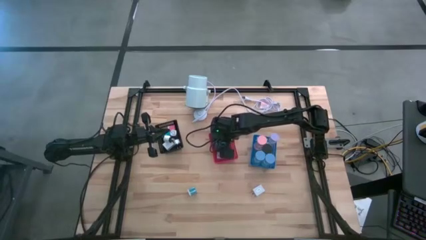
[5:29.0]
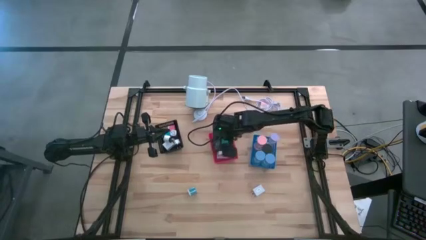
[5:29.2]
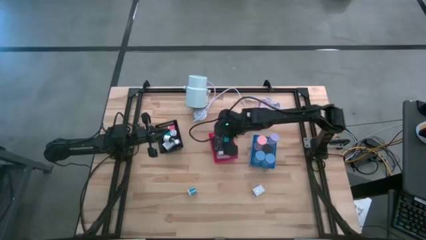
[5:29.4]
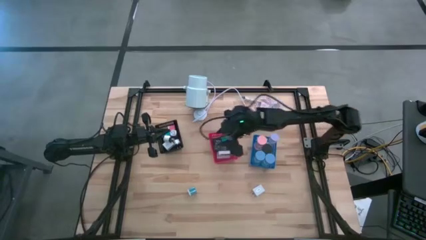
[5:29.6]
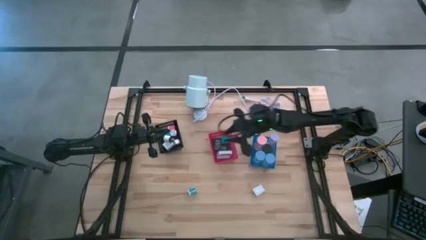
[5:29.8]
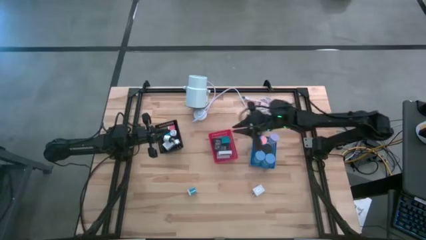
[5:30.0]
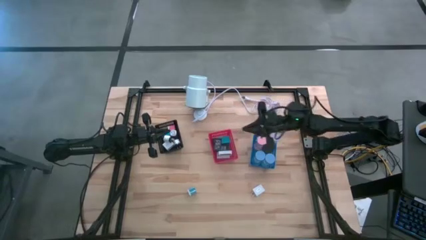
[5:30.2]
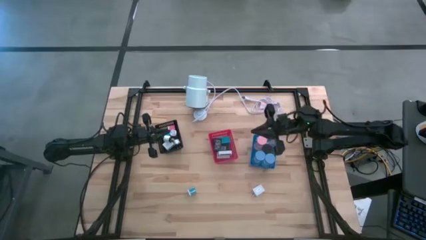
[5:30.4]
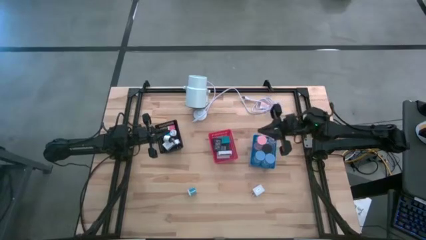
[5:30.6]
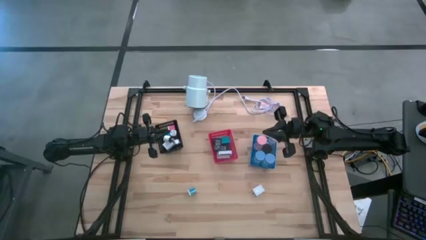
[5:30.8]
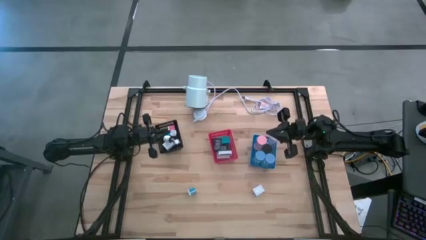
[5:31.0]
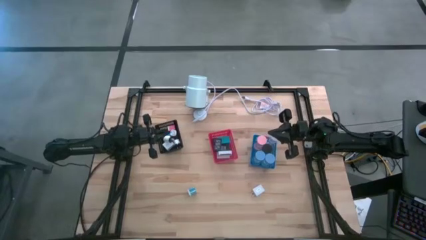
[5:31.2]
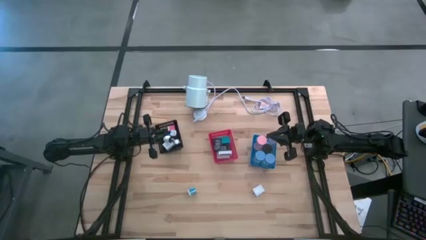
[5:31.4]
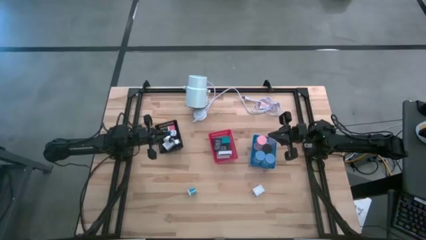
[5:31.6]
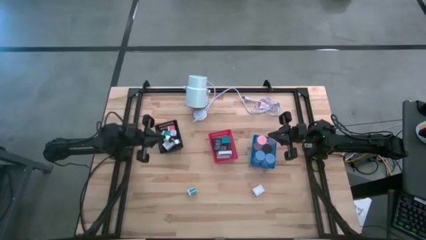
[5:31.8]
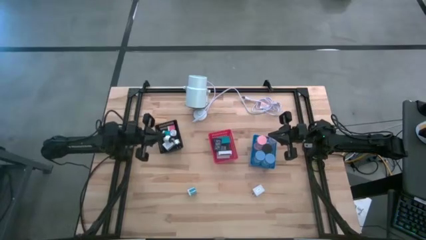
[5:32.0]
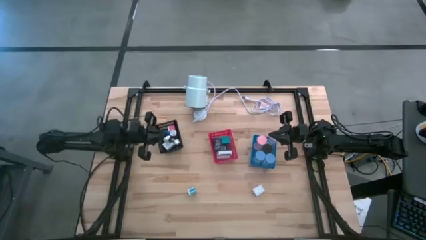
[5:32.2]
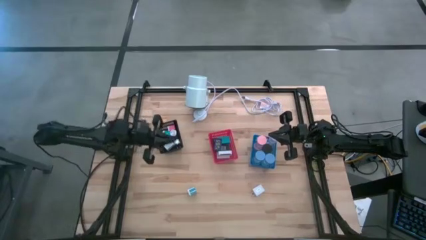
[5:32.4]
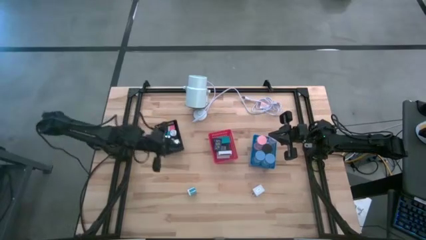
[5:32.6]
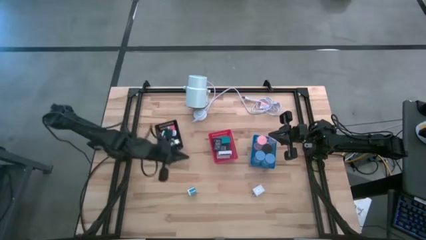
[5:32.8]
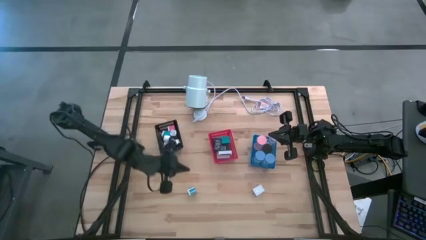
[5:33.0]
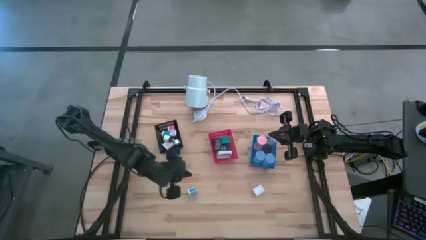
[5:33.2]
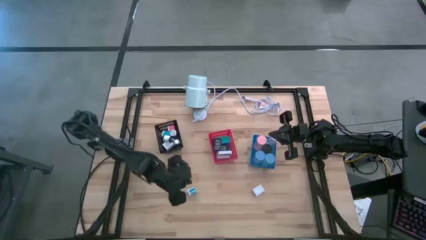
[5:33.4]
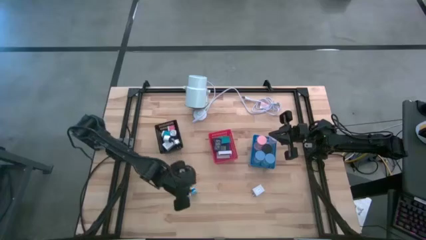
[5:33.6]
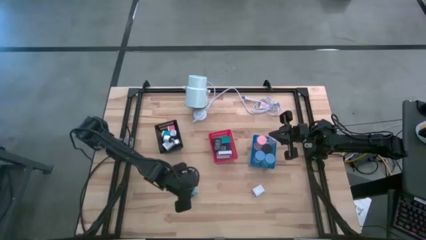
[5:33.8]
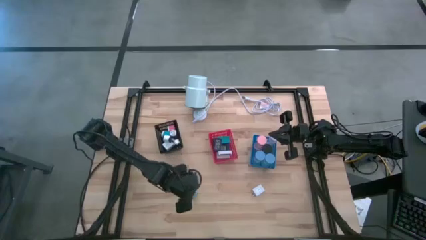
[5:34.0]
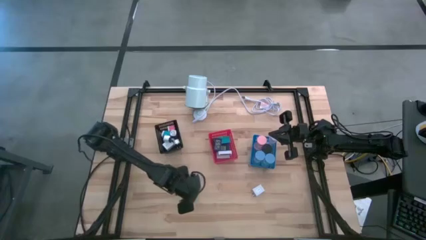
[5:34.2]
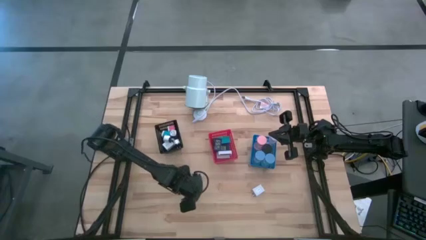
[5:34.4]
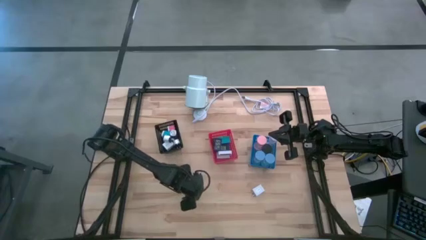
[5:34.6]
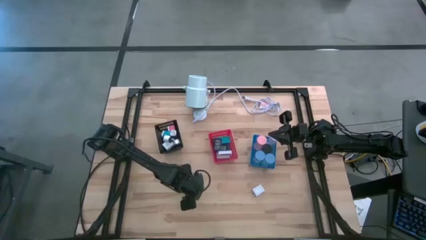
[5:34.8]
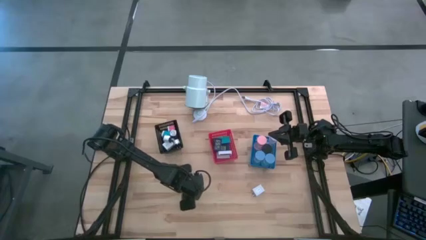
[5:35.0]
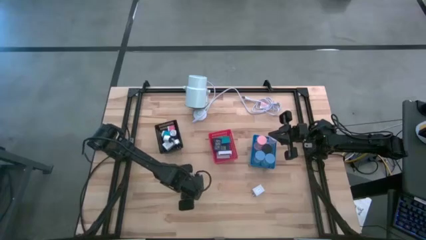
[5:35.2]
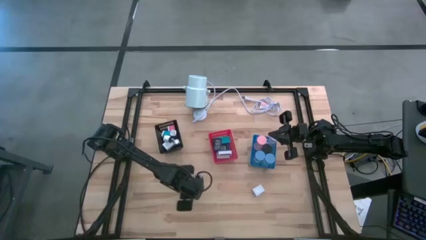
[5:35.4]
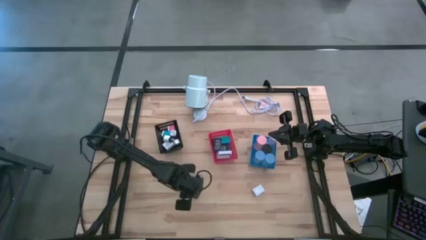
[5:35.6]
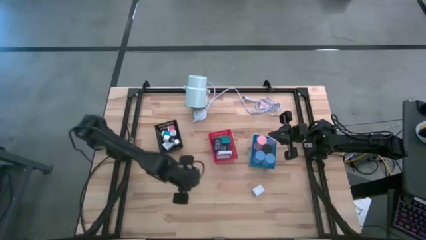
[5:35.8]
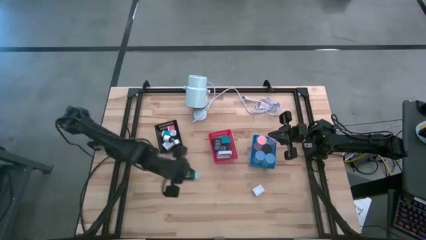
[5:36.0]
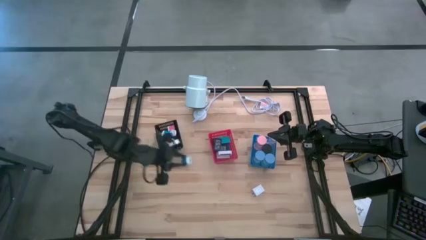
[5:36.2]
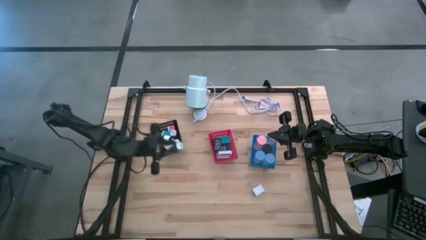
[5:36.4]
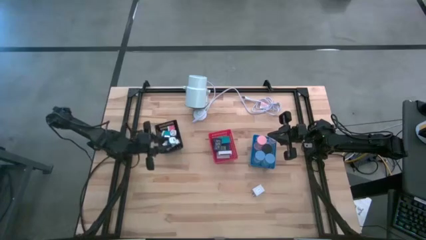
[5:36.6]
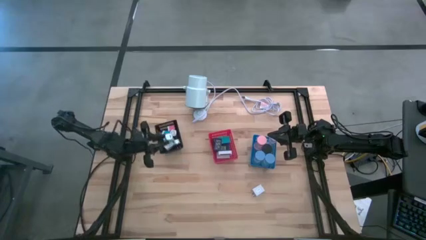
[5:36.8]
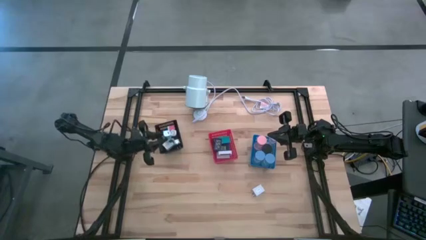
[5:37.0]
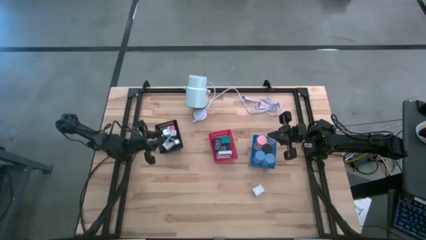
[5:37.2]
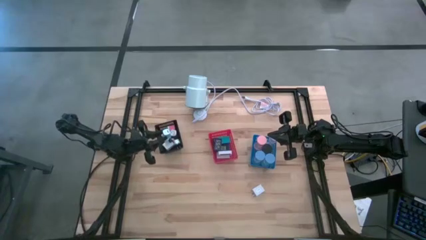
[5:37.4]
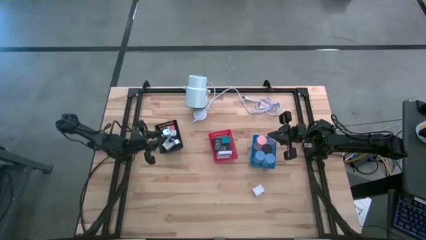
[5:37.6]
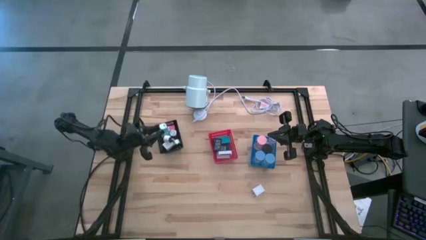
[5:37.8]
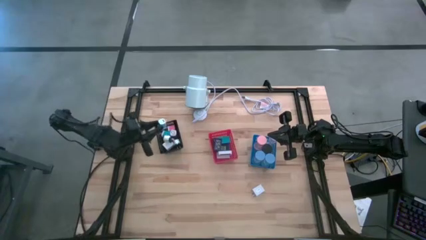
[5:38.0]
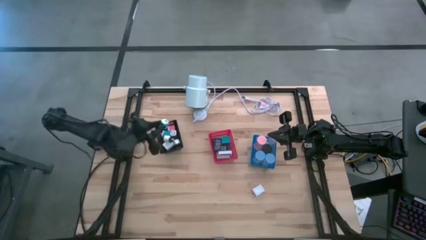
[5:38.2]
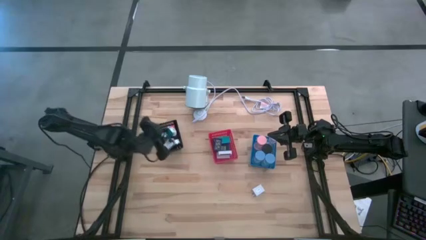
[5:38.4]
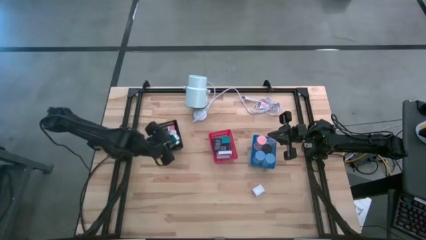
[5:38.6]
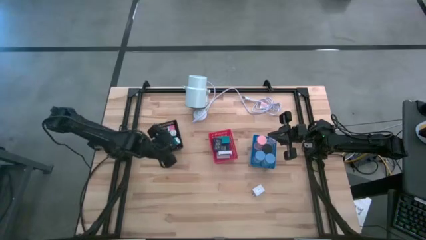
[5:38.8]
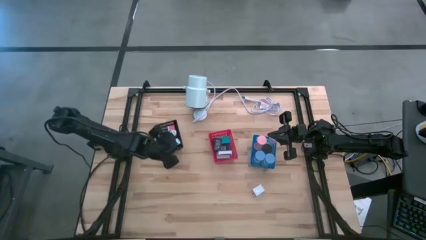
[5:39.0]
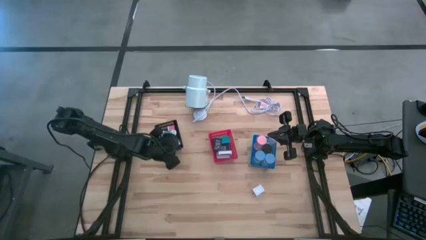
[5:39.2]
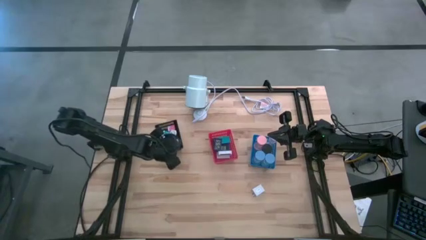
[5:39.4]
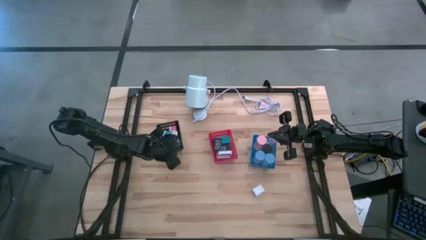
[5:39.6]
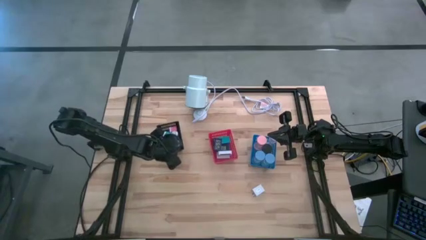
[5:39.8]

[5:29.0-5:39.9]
Task: Pick & Place Office items
Put the blue charger adapter into the black bin

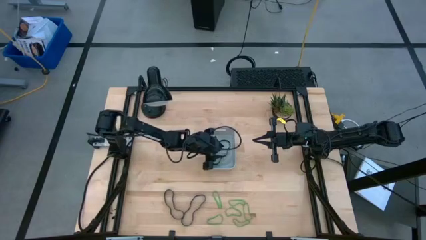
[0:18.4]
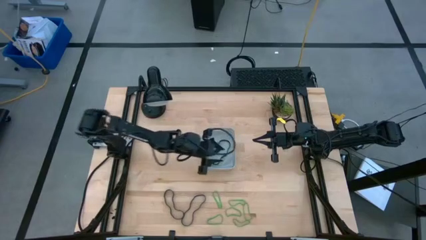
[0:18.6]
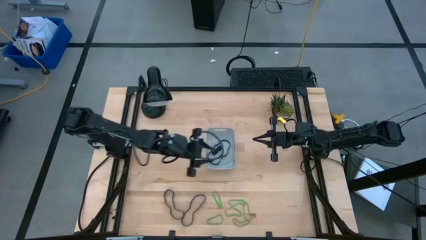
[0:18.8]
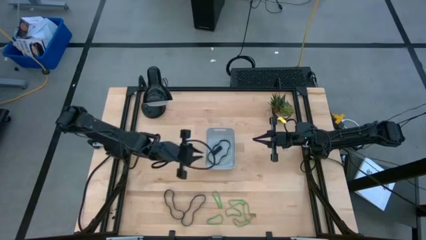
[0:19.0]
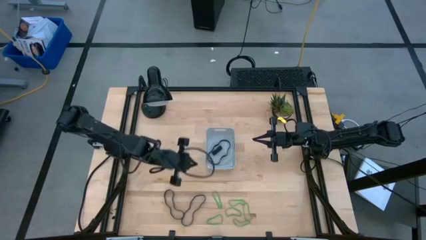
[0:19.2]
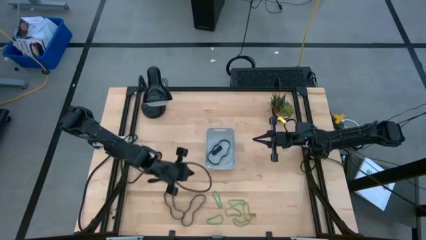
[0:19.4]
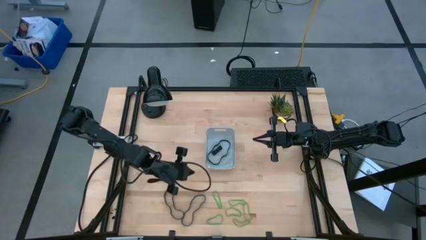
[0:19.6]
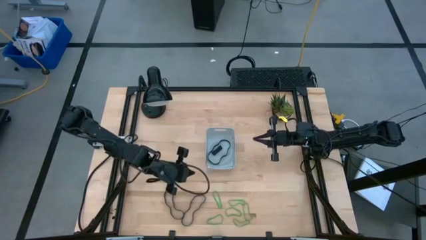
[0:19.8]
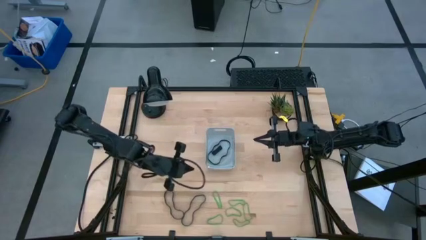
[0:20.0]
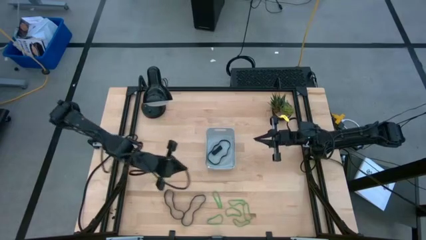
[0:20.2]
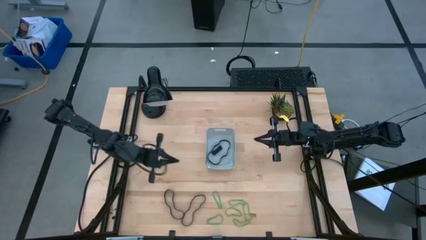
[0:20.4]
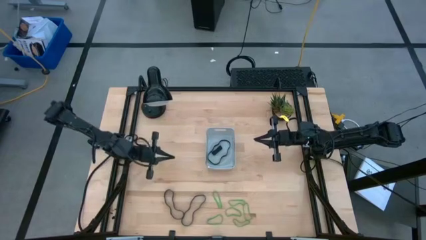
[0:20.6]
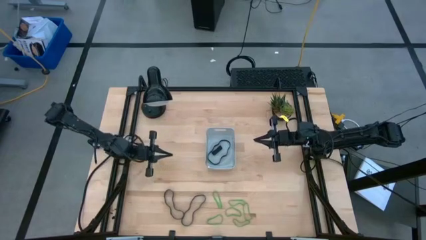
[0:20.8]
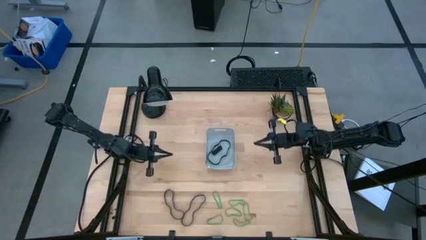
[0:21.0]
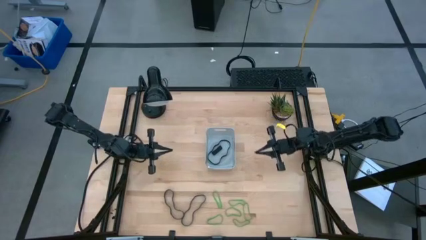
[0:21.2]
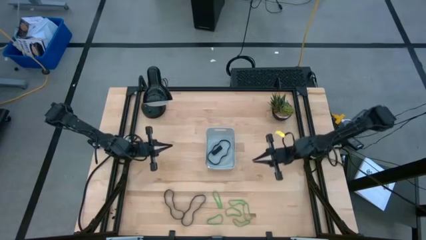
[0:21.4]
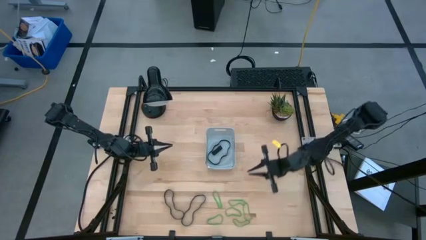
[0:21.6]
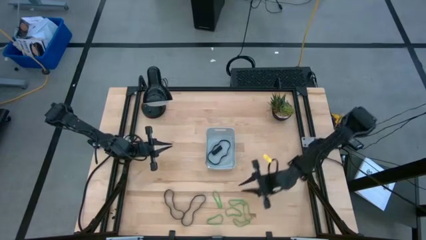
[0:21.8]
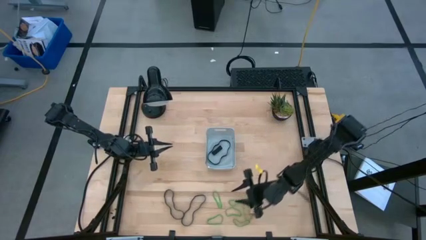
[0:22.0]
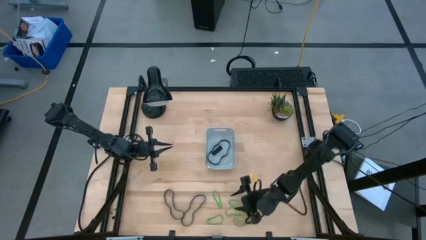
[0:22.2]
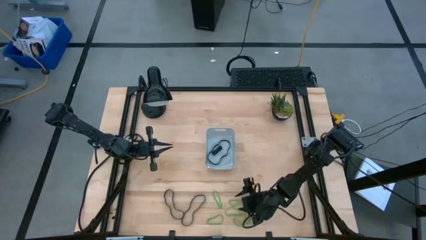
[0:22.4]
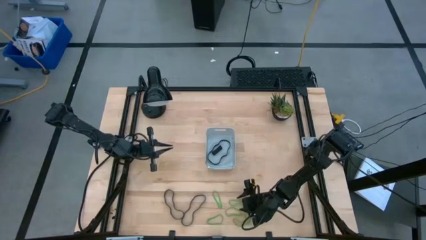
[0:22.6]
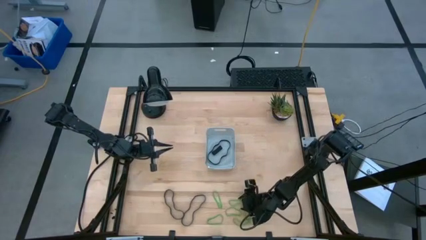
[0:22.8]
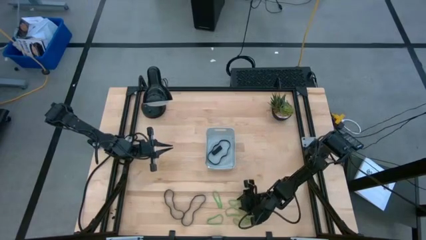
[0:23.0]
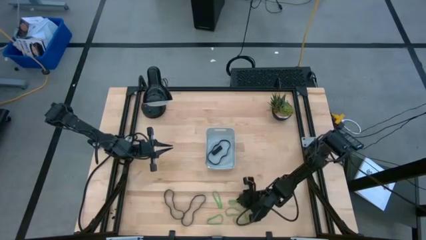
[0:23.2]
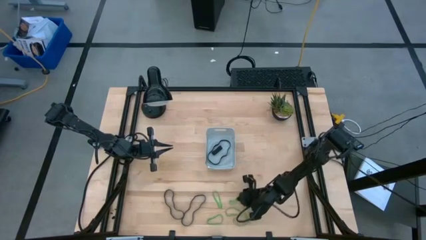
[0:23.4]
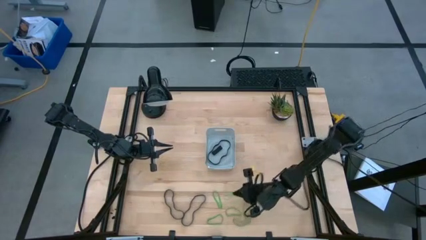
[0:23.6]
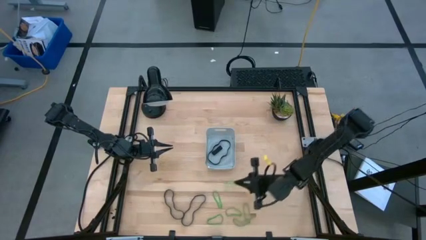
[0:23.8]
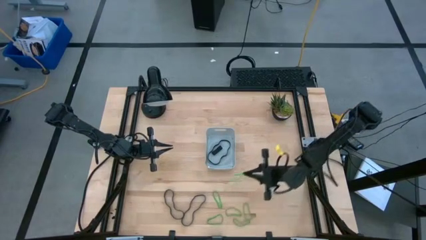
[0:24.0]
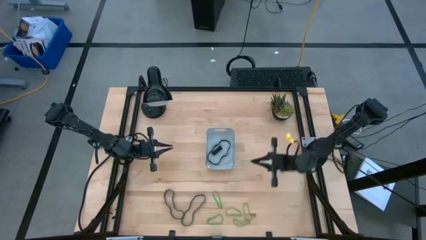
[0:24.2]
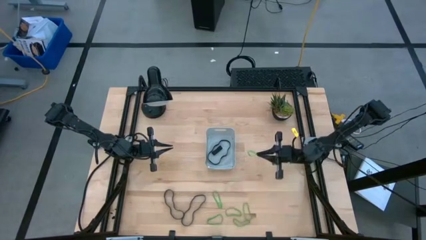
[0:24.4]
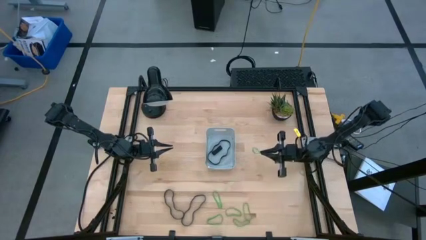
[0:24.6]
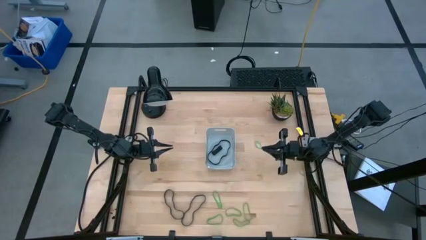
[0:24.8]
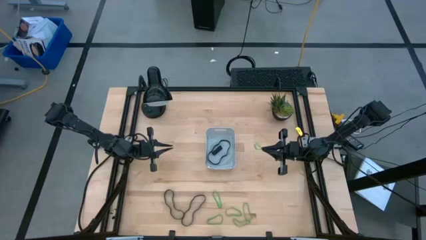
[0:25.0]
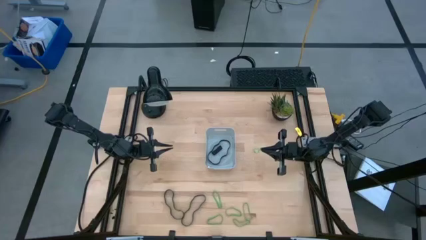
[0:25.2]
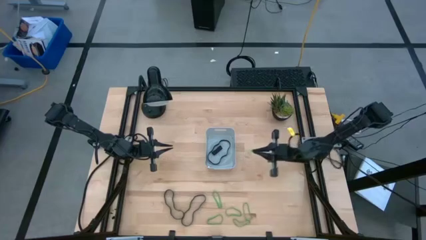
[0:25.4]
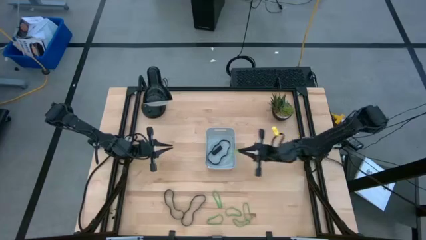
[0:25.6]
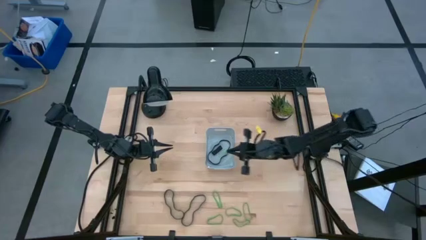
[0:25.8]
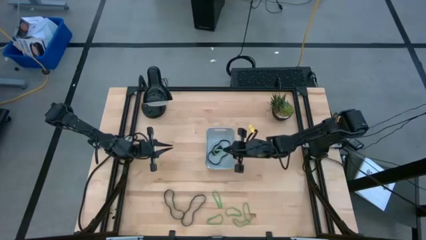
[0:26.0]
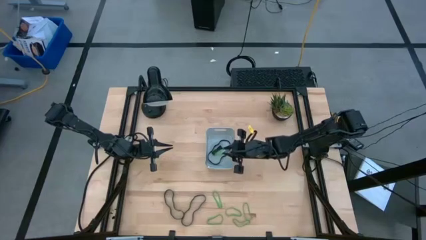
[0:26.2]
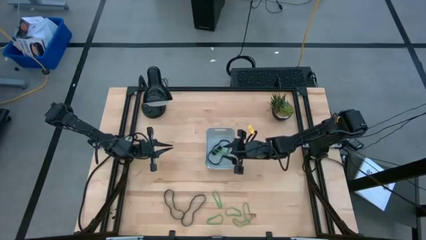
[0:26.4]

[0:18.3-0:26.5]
Task: Pick and place rubber bands into bin
Put the green rubber band into the gray bin
